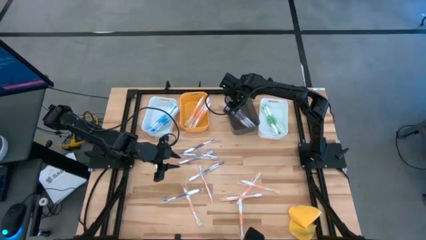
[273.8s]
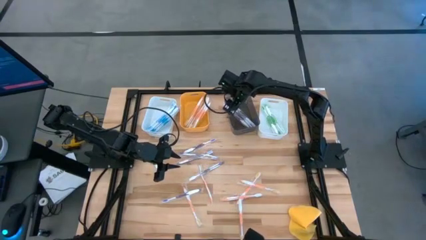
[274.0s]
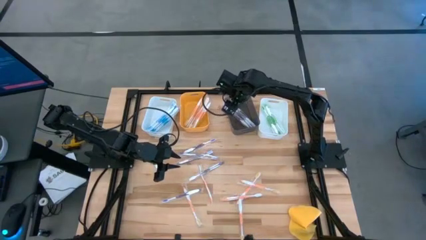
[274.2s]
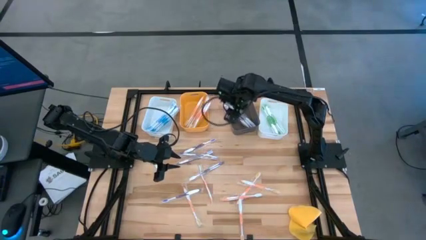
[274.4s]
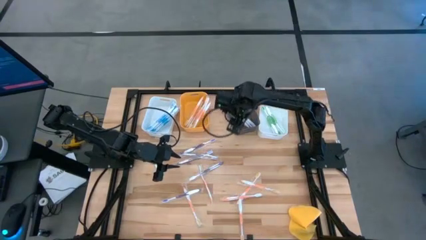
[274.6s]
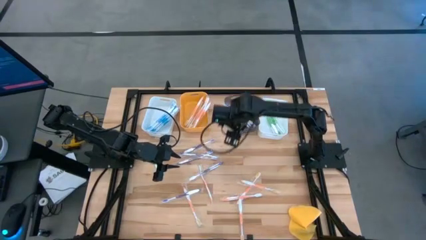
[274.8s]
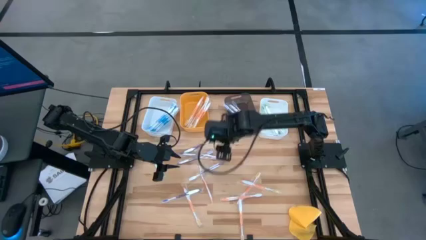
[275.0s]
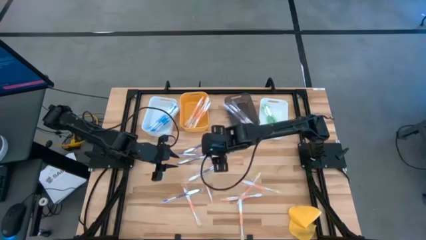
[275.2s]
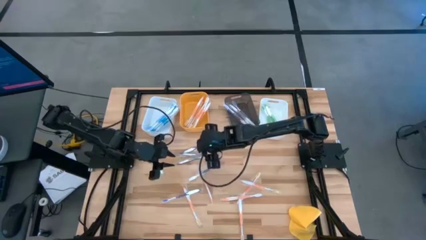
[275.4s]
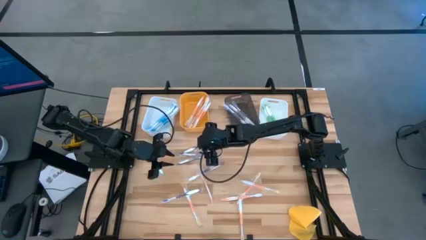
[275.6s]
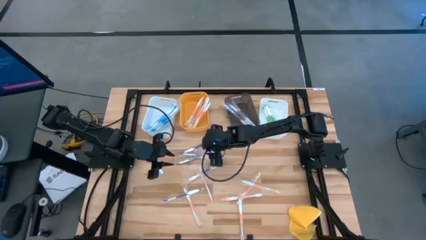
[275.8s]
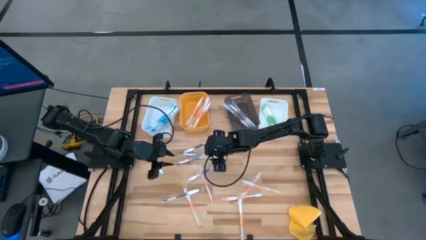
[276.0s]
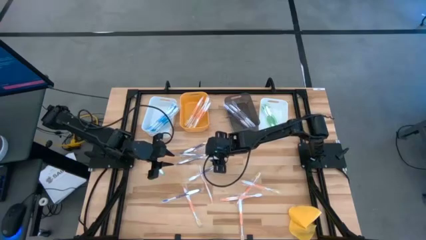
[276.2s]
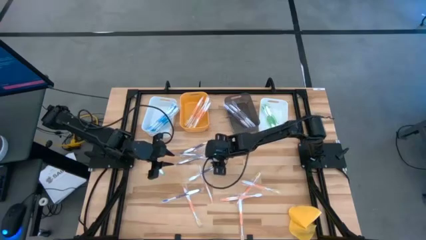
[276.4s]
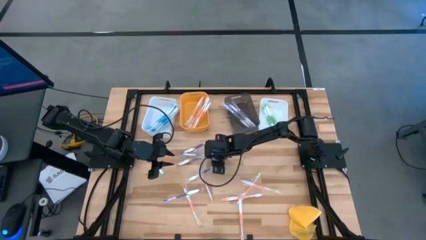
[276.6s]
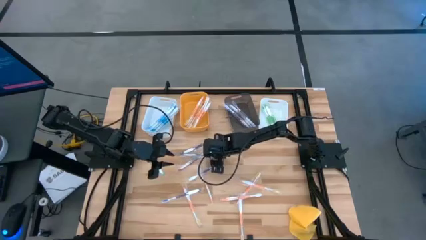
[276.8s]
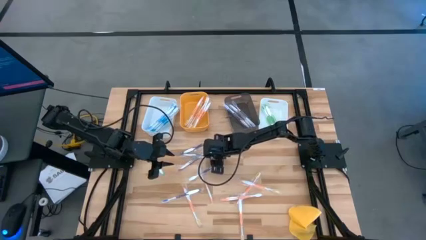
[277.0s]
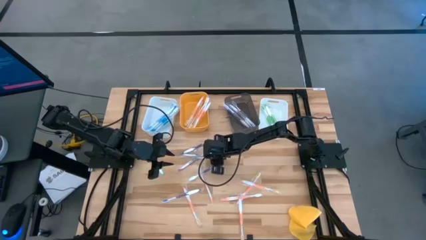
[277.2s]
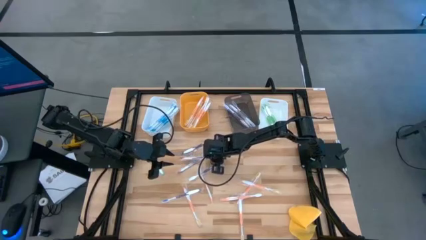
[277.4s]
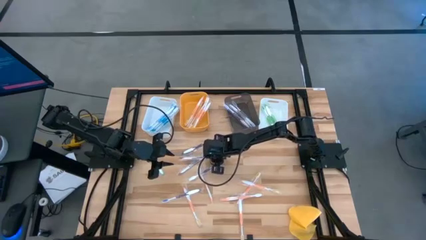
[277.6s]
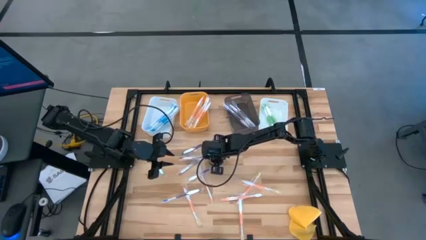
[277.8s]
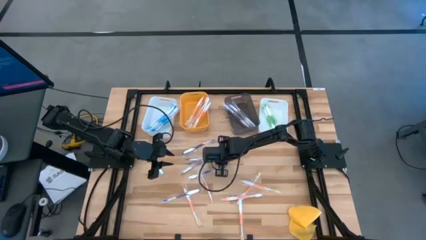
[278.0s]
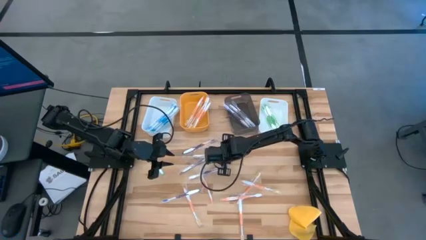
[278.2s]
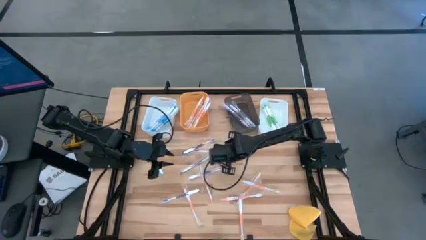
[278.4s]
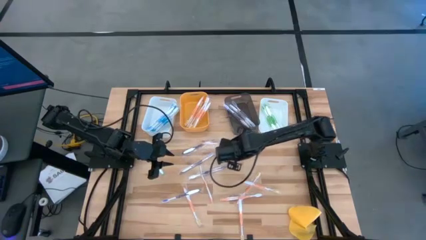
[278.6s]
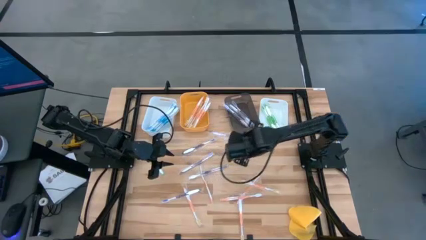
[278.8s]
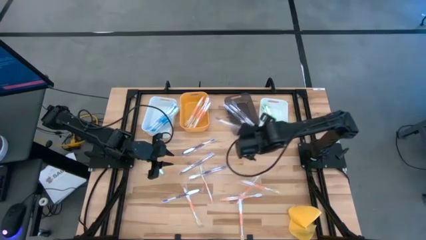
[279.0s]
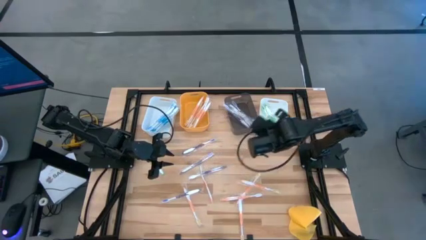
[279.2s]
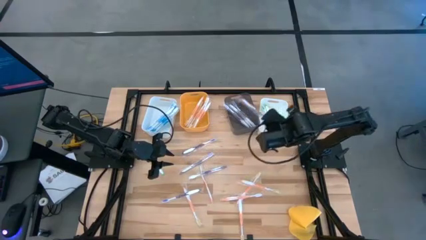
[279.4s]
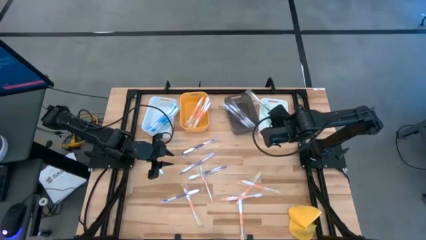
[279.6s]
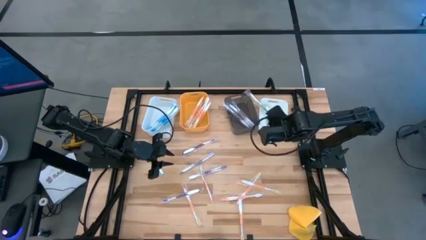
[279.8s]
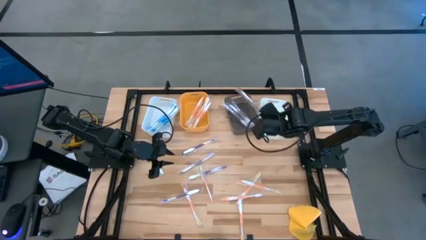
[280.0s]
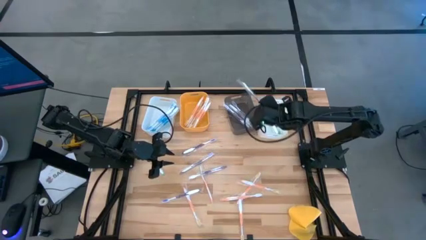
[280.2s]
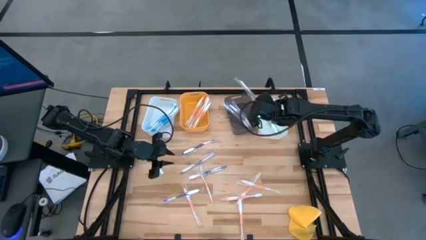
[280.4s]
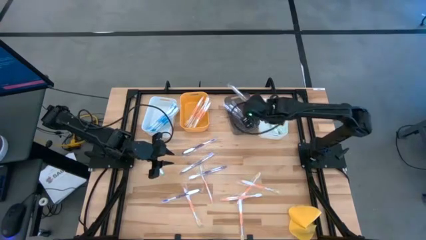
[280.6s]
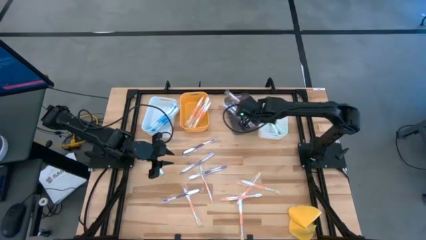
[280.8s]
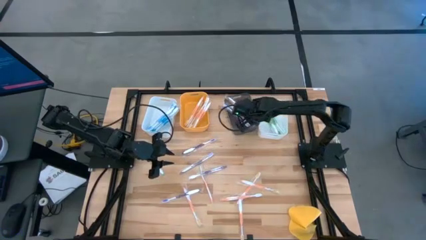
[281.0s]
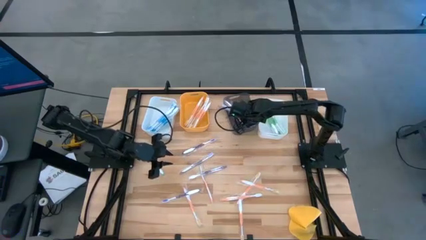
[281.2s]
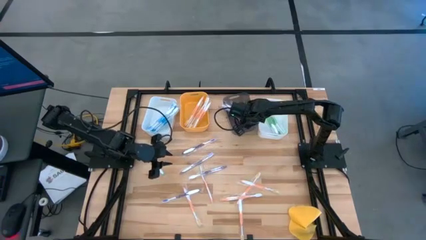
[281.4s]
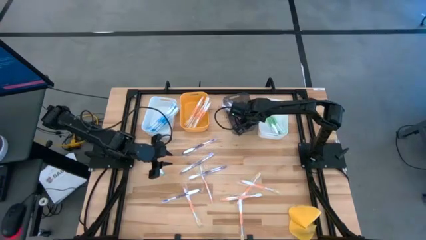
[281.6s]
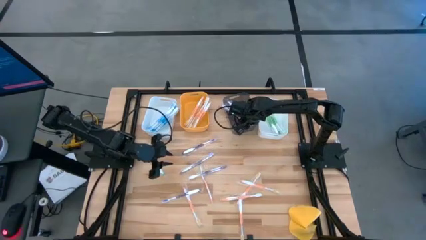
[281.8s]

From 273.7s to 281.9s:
Task: Pick & Place Toothbrushes
Put the violet toothbrush into the gray bin

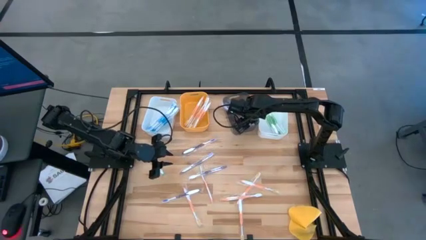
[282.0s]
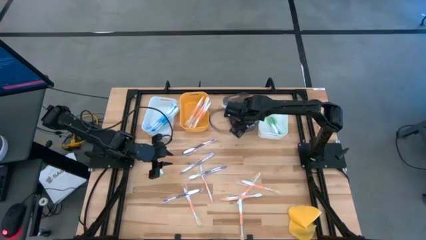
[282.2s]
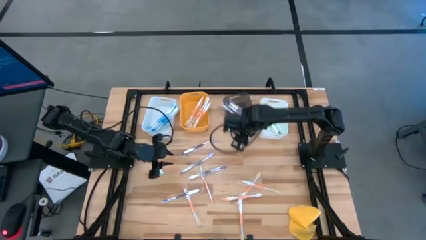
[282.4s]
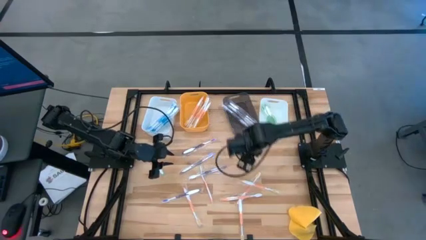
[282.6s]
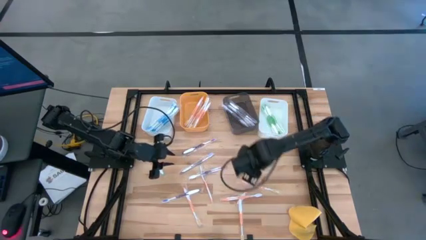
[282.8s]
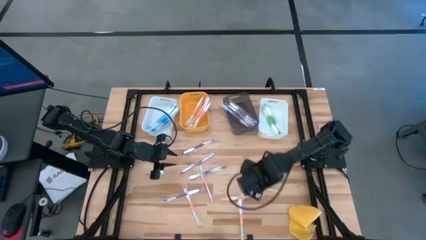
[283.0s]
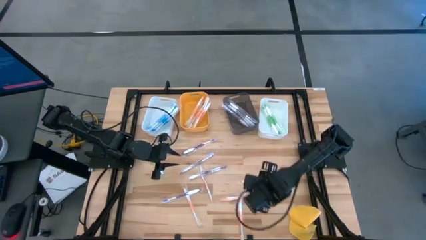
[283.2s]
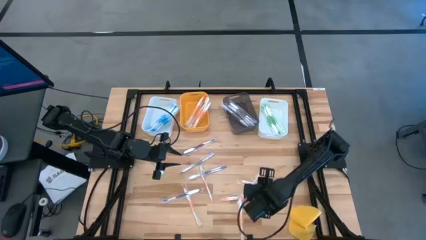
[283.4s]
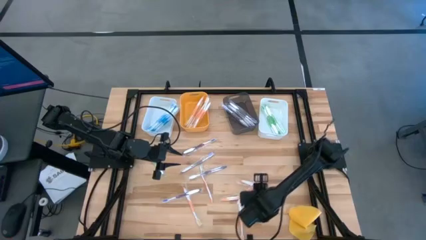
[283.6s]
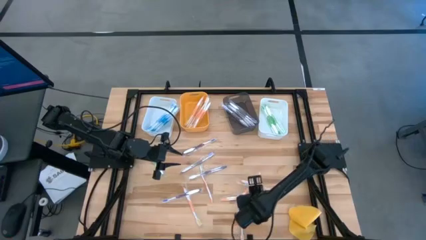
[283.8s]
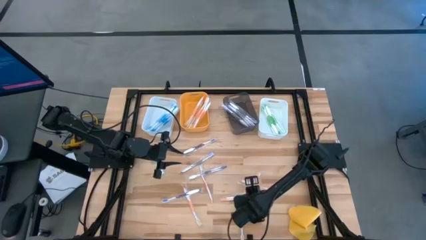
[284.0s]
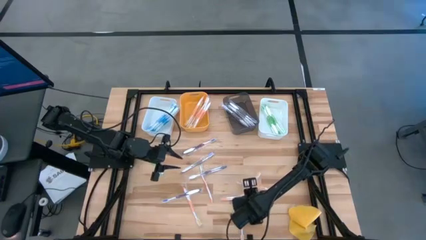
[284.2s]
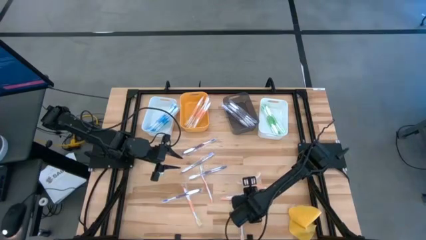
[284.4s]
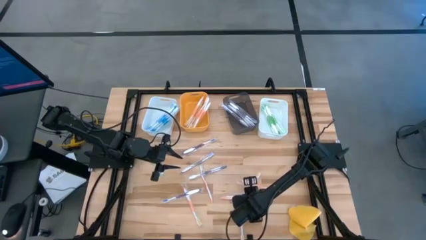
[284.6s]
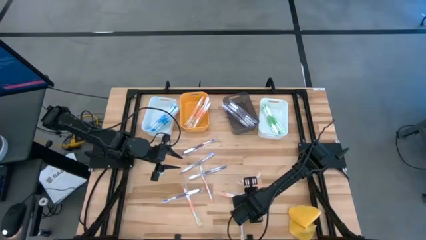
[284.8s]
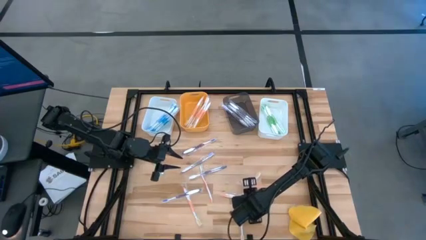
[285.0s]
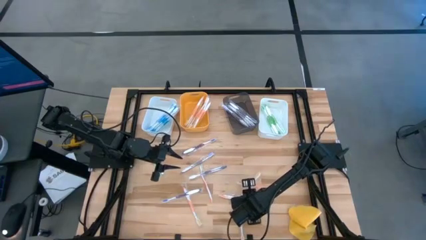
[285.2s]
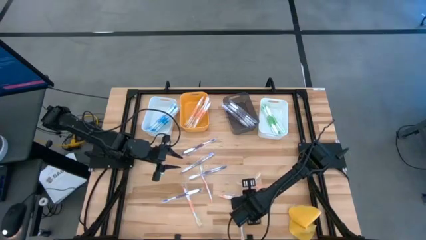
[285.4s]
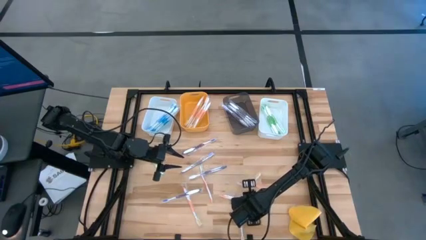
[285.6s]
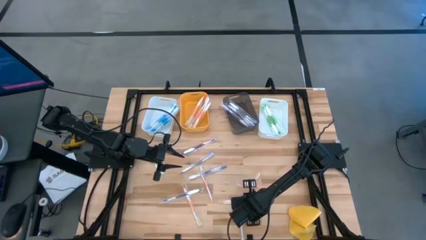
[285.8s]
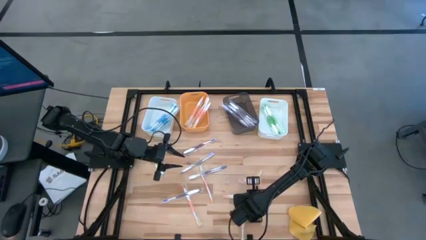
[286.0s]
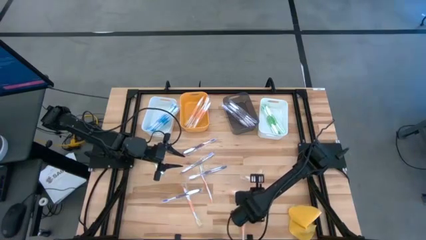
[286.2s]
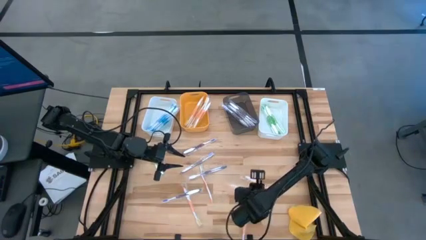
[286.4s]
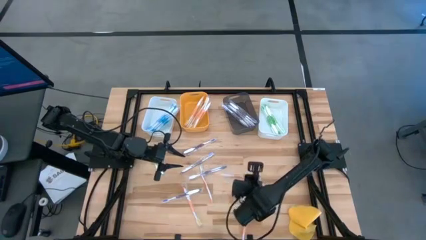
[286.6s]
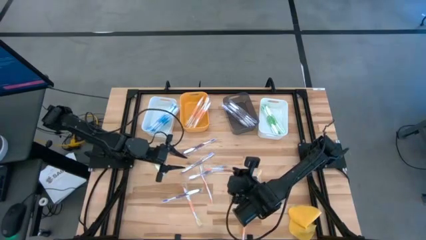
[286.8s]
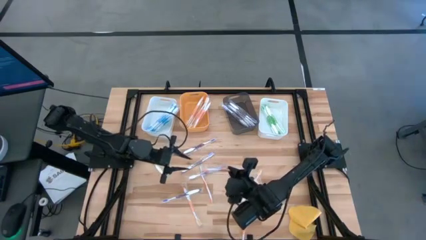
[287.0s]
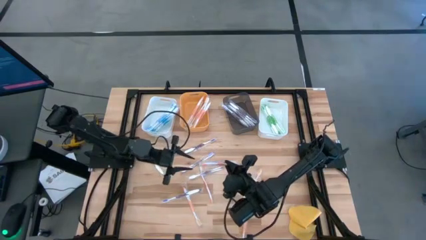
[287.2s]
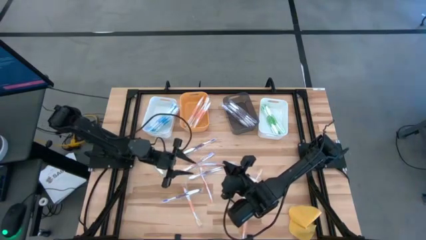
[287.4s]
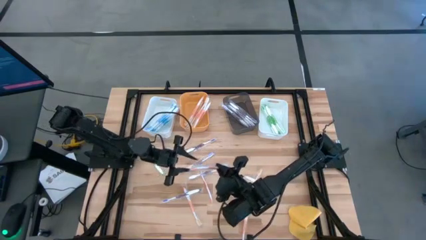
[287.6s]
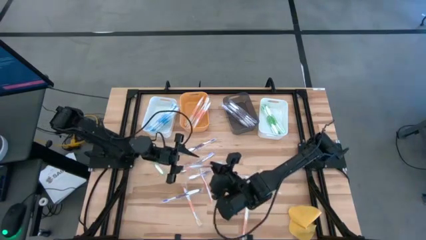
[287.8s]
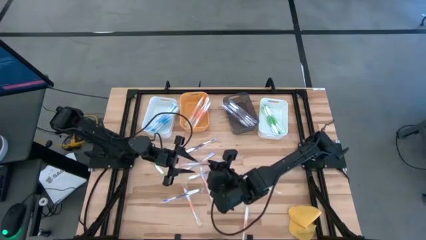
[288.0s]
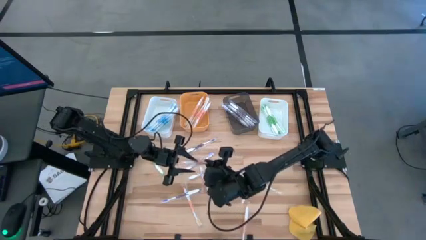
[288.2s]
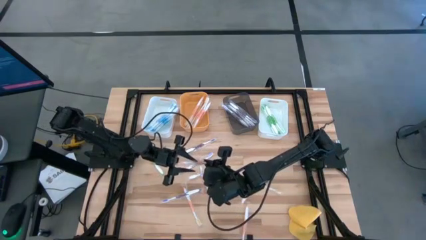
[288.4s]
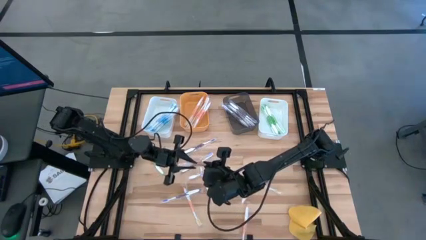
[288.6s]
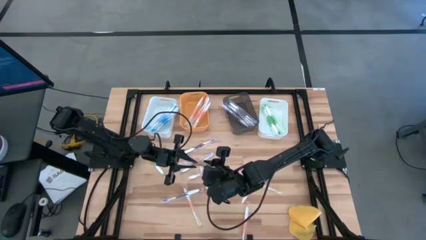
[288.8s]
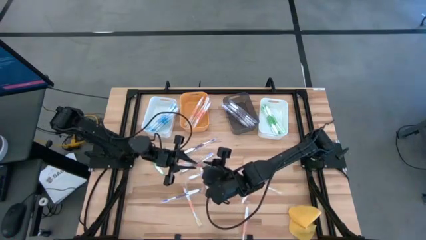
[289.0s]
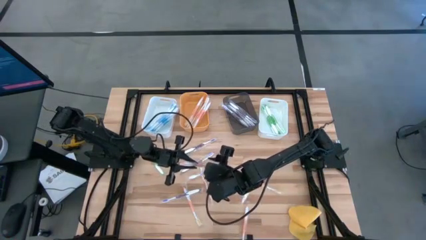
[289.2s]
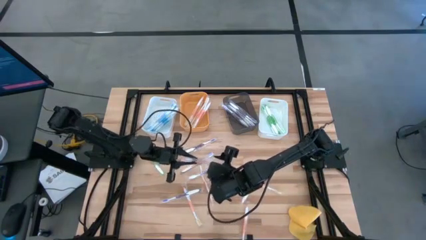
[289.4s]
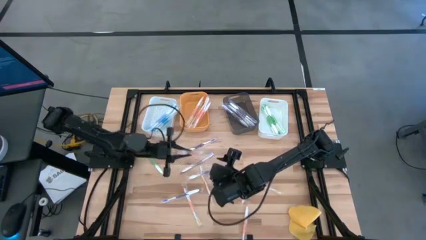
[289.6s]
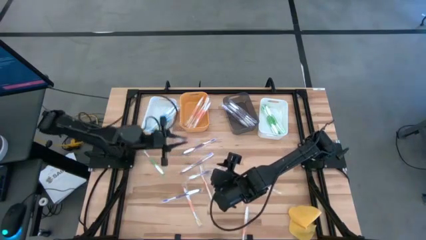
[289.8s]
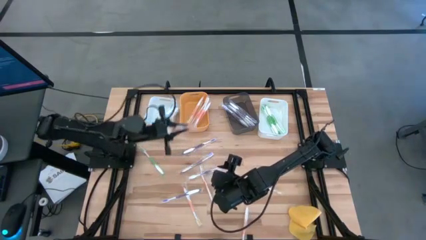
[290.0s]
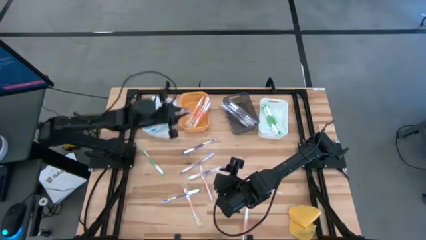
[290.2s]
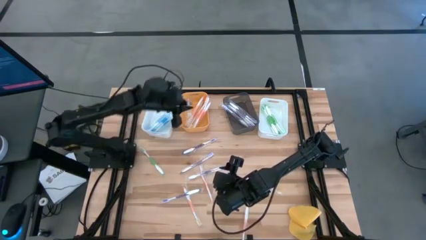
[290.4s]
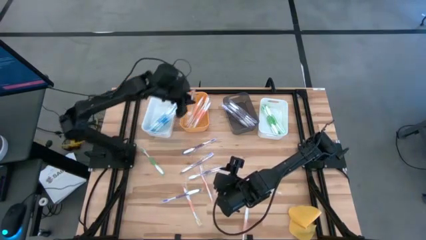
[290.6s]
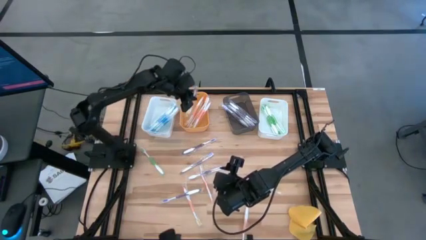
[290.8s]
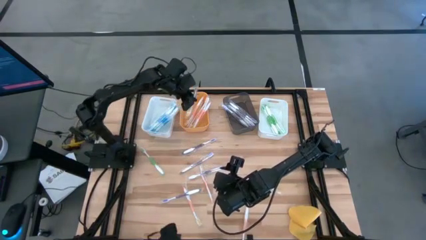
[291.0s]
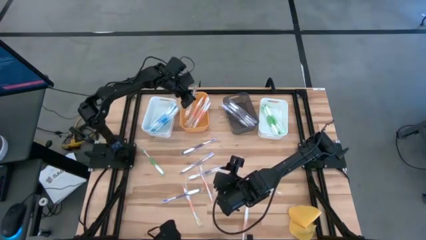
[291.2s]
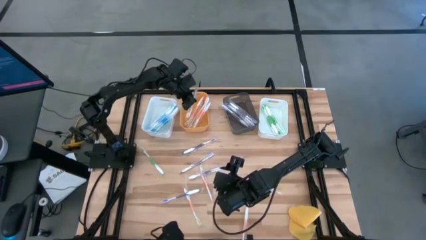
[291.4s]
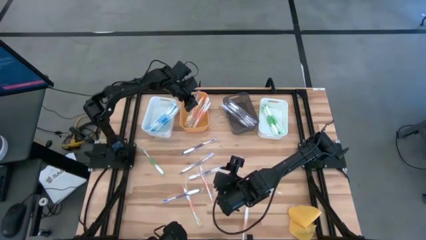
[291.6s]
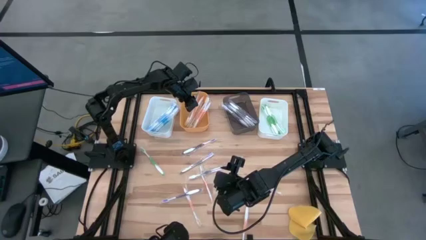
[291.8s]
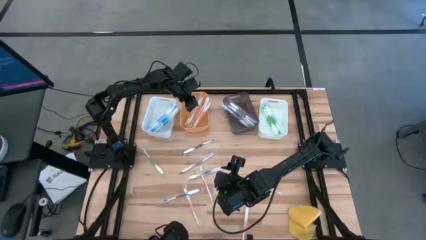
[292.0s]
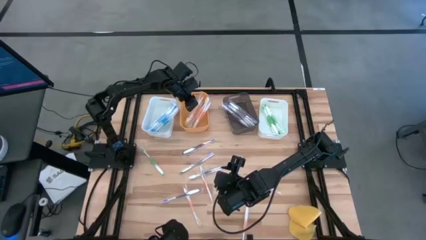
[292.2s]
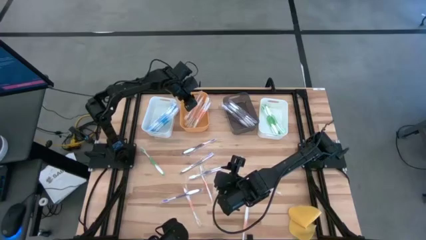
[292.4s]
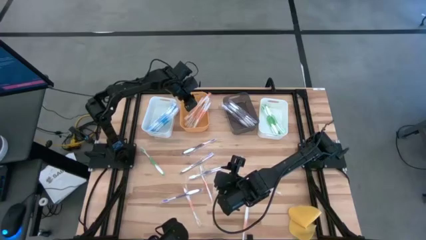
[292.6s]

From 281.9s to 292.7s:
Put the orange toothbrush into the yellow bin
